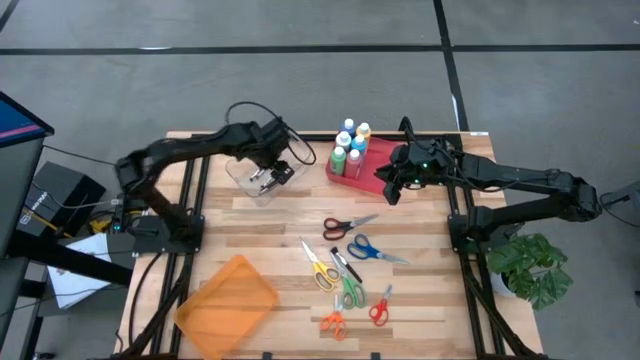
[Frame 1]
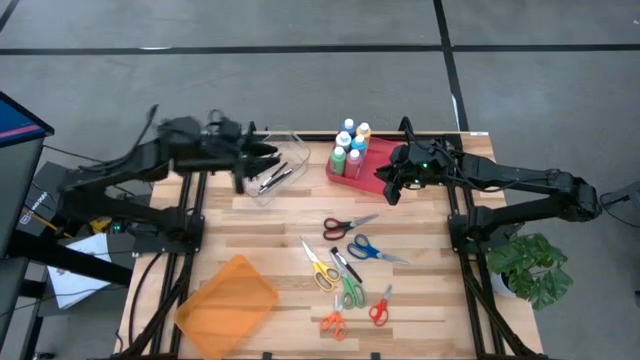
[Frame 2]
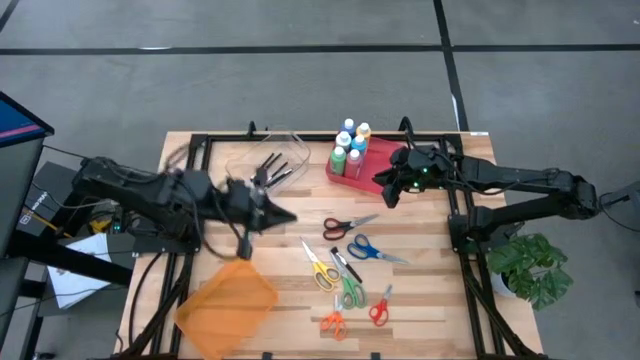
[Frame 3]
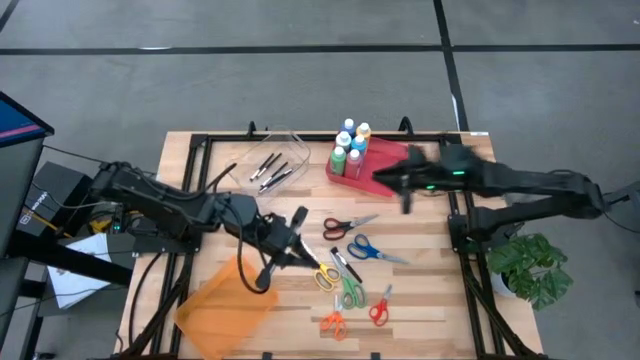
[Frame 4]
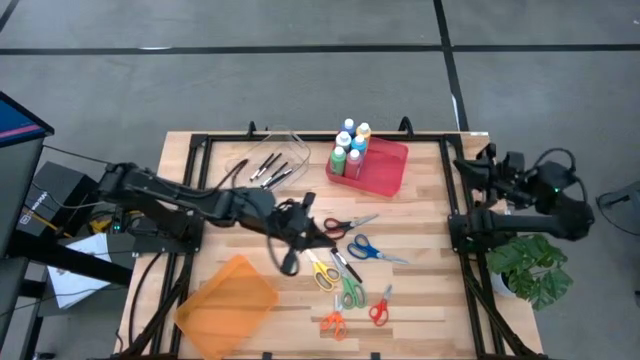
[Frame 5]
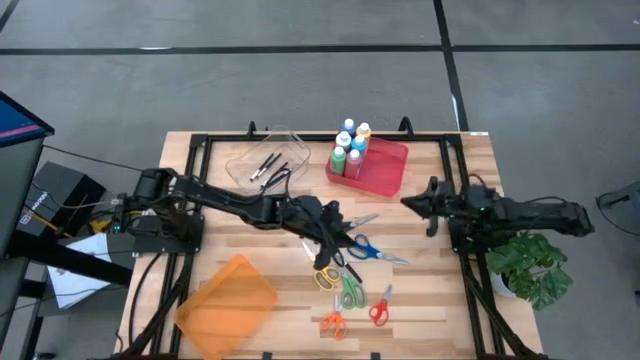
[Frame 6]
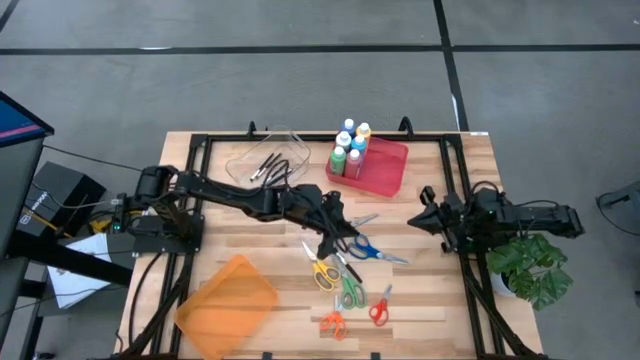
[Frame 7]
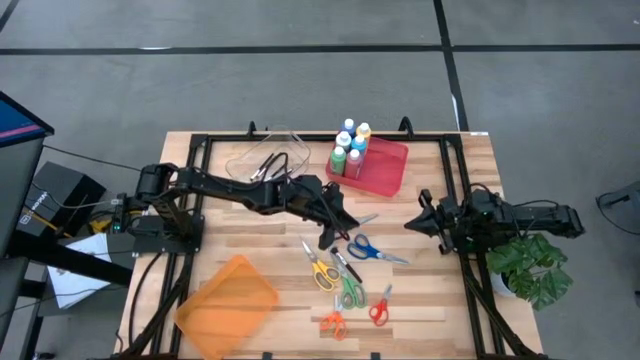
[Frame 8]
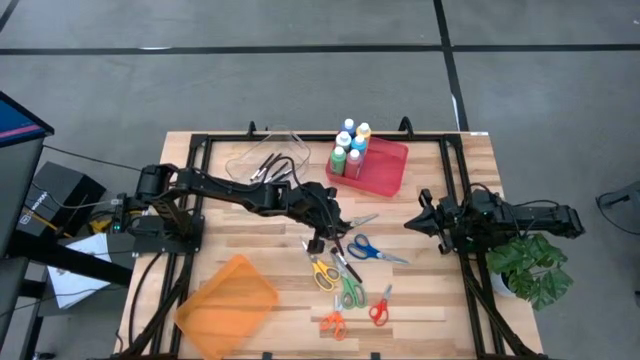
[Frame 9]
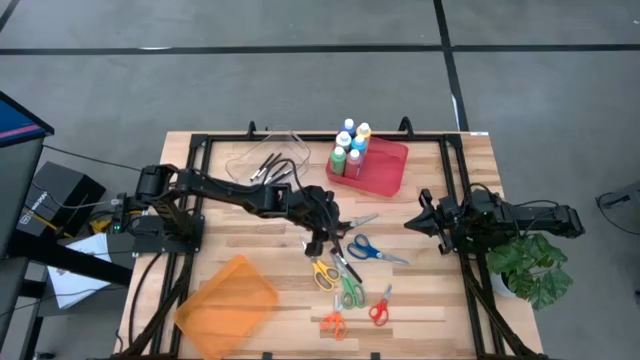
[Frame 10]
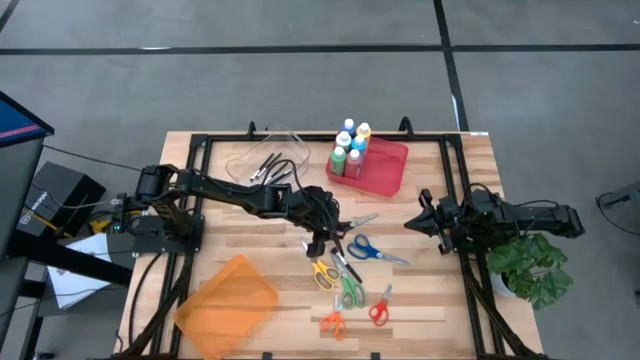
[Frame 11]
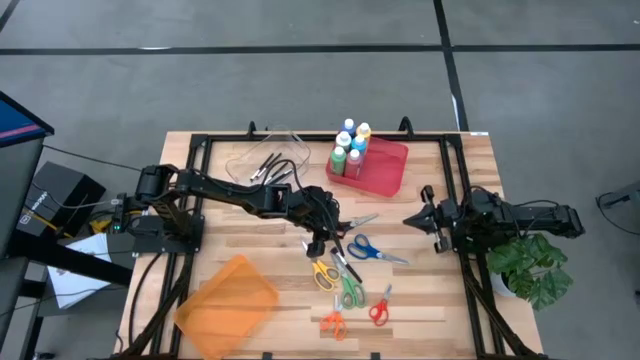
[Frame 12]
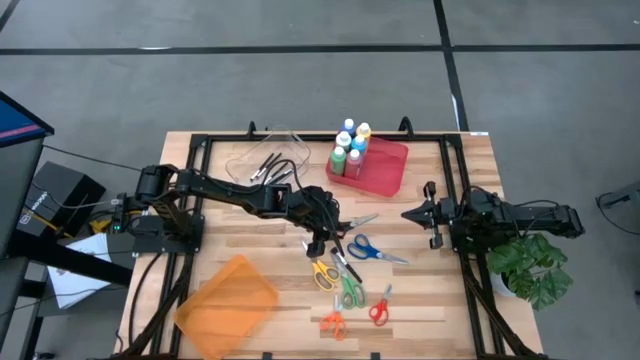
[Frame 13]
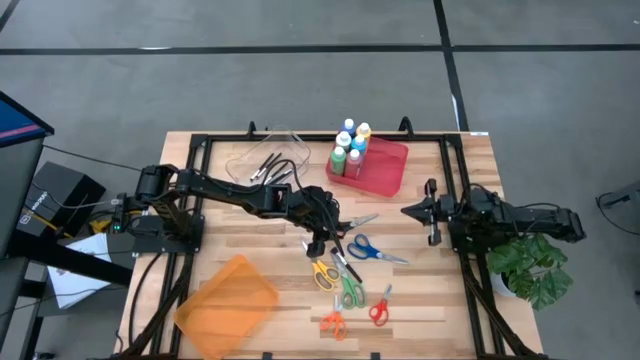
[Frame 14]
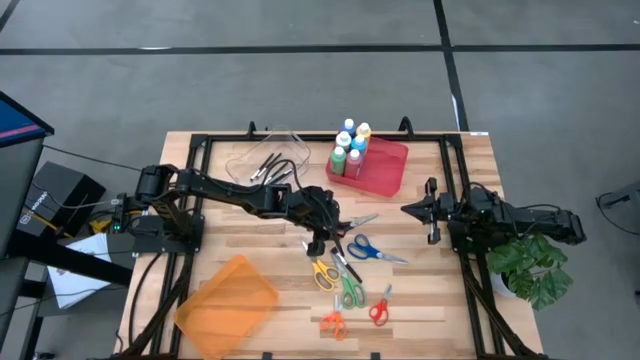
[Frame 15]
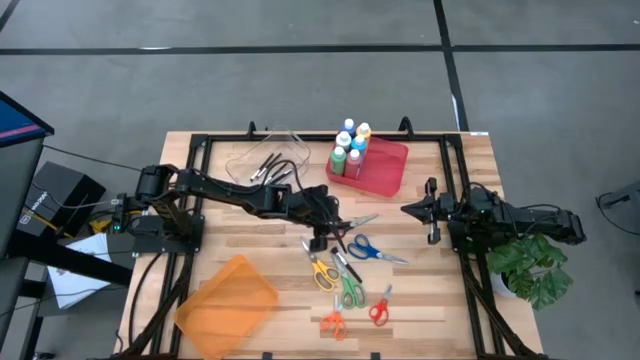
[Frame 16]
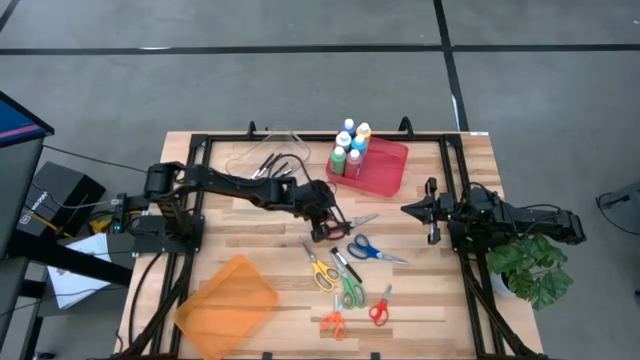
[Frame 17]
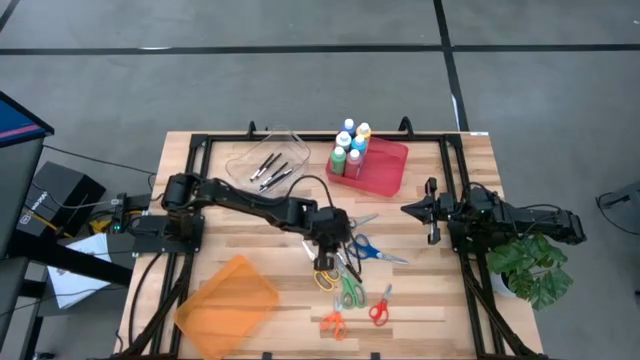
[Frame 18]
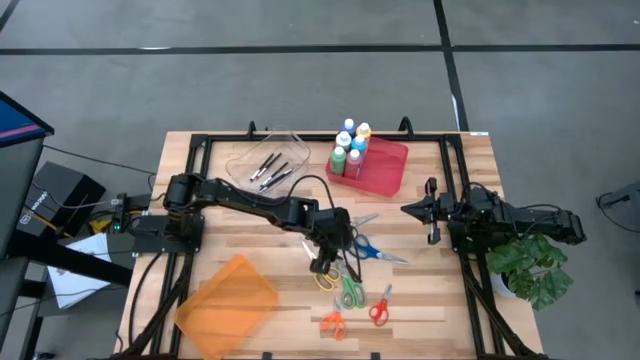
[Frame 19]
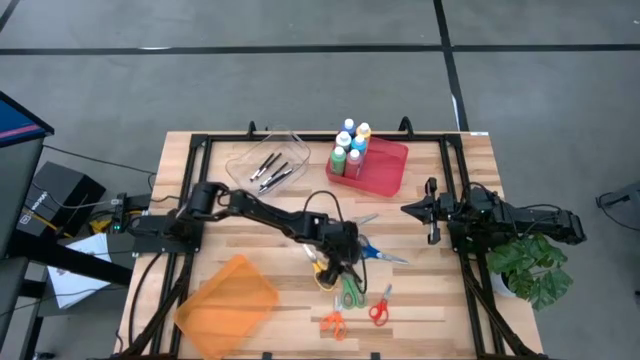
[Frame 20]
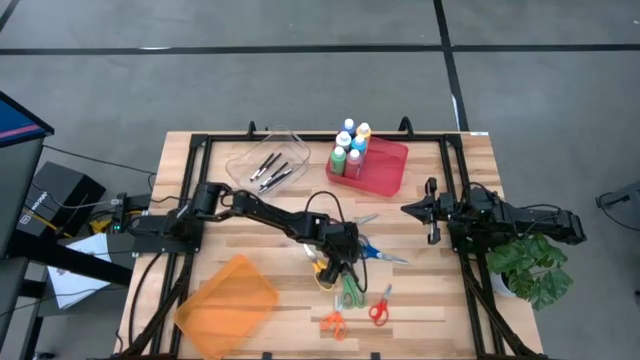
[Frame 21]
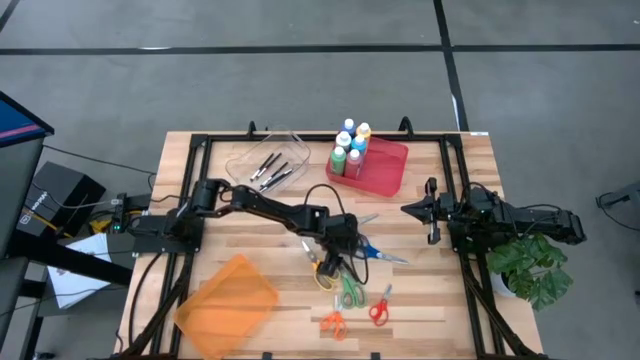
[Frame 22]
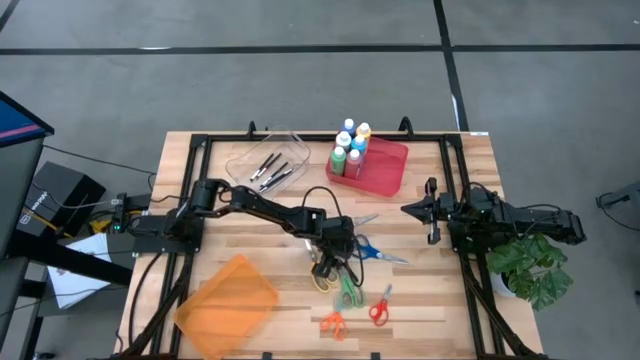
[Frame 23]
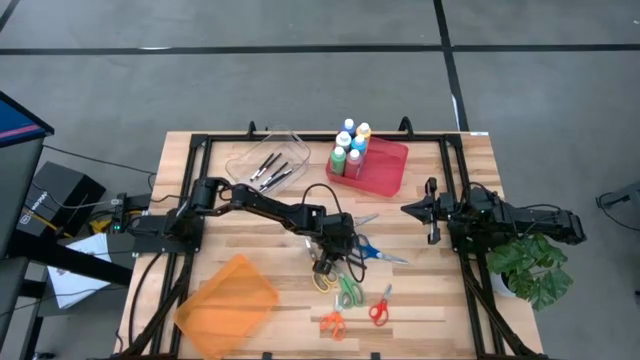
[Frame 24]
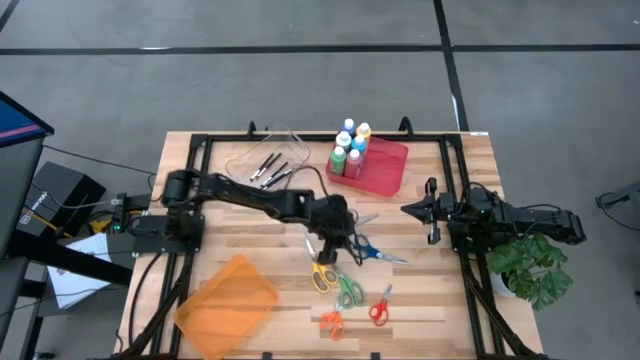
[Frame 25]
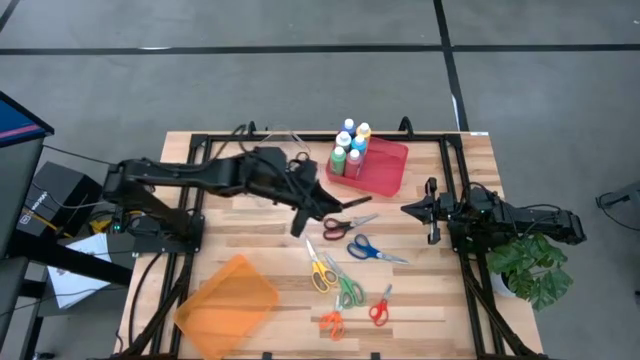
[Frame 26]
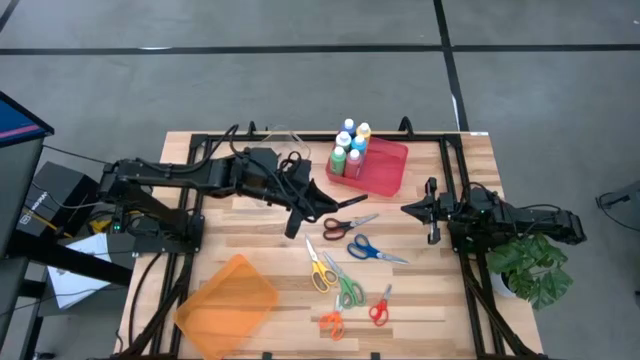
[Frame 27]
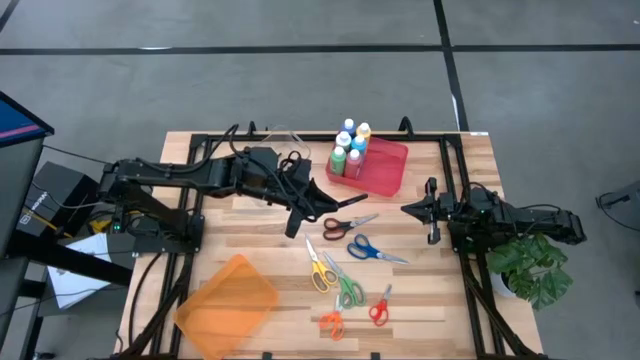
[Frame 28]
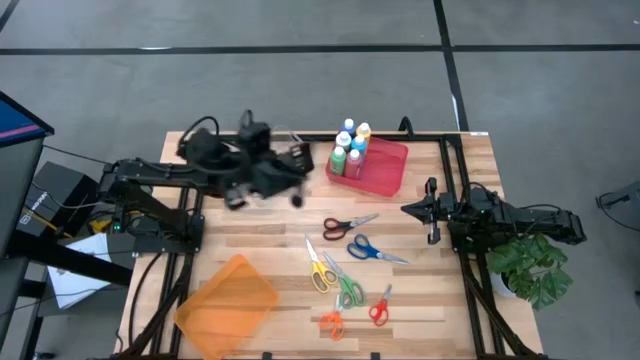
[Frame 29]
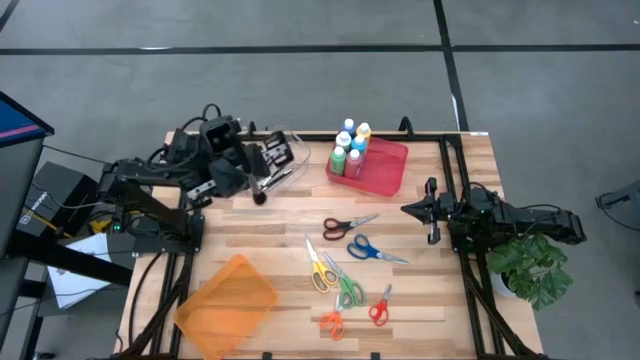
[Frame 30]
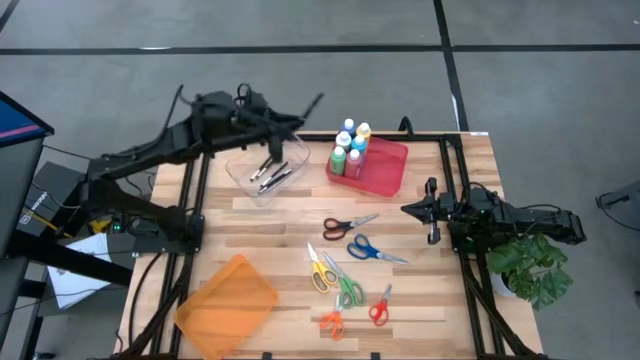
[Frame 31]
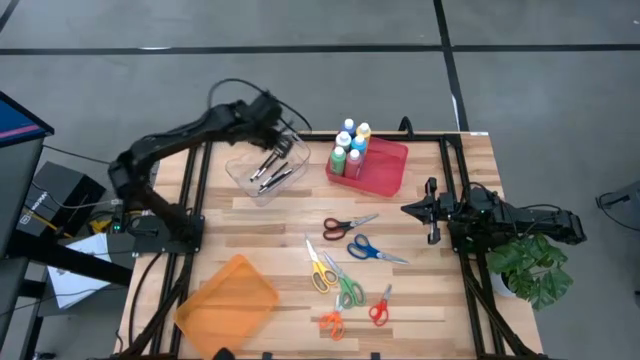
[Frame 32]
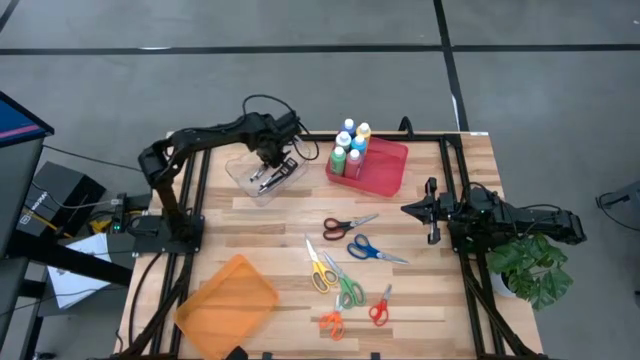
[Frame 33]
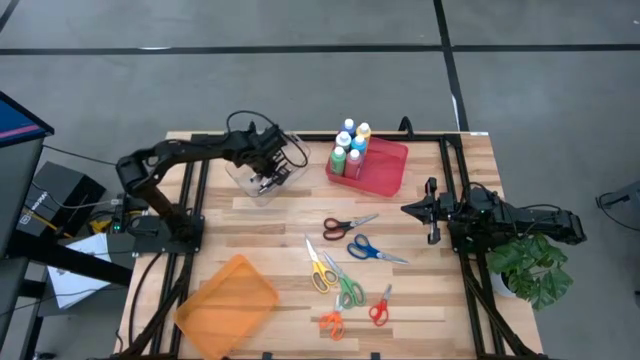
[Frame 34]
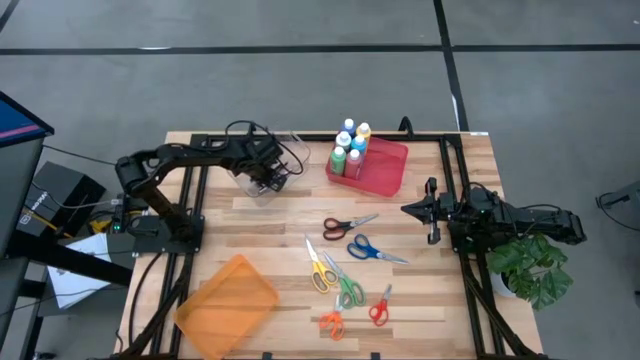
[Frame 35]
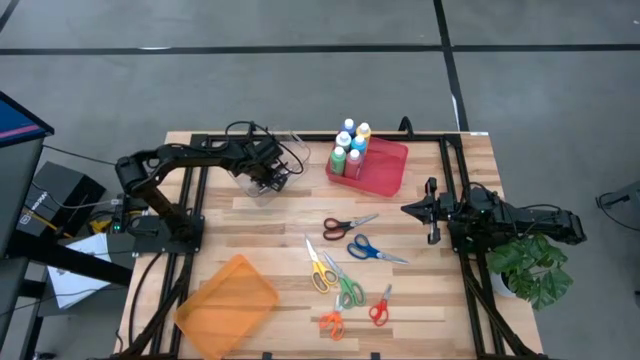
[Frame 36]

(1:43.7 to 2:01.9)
Task: Pick & Place Paint Supplies
Put the black paint brush into the transparent bin
